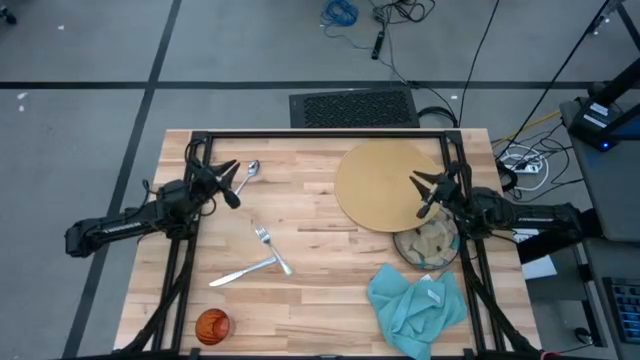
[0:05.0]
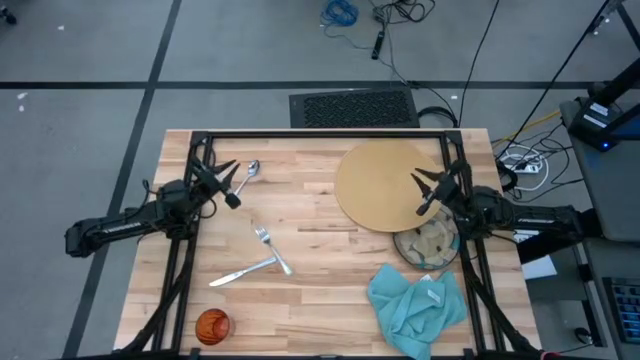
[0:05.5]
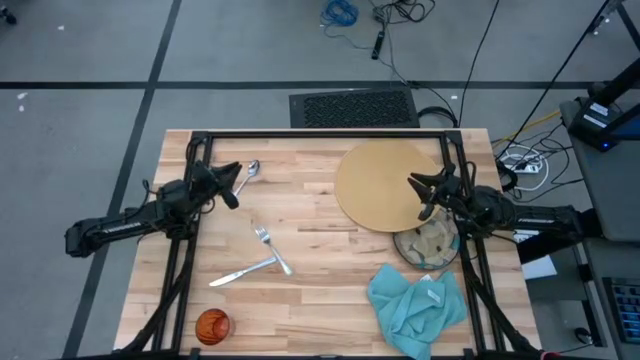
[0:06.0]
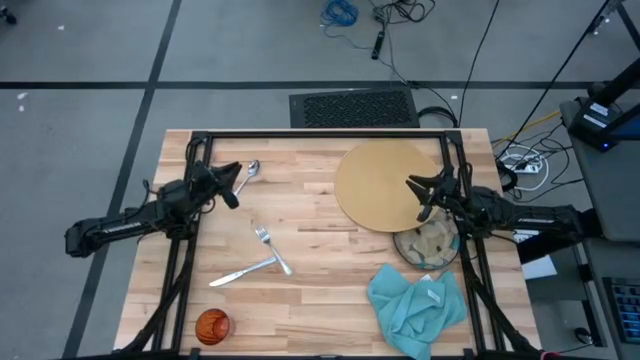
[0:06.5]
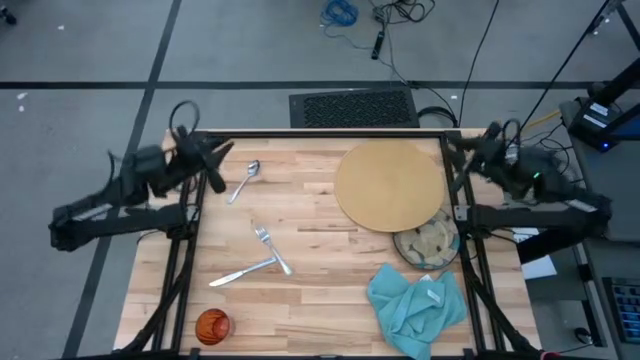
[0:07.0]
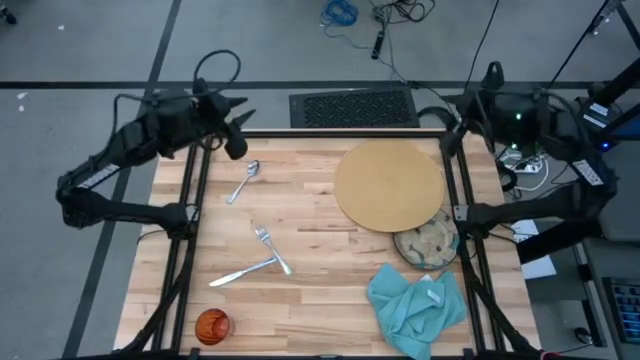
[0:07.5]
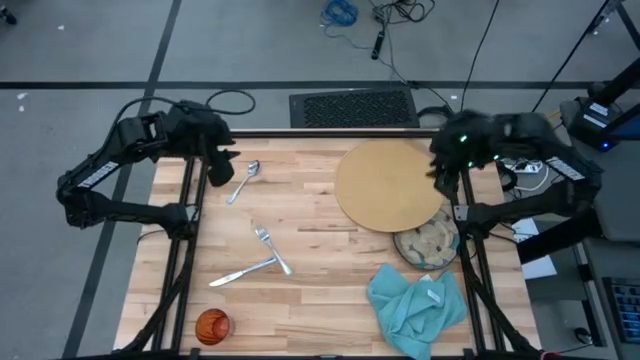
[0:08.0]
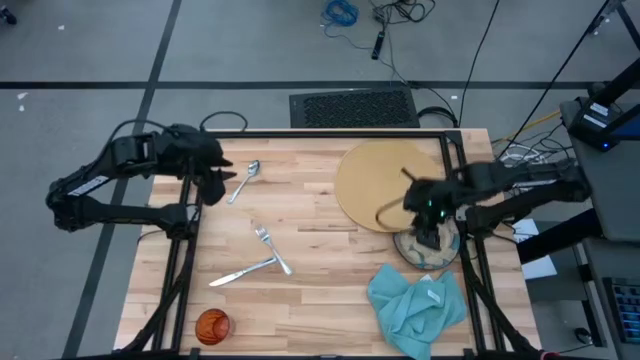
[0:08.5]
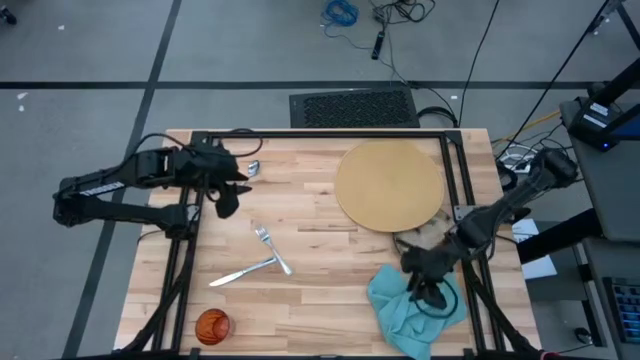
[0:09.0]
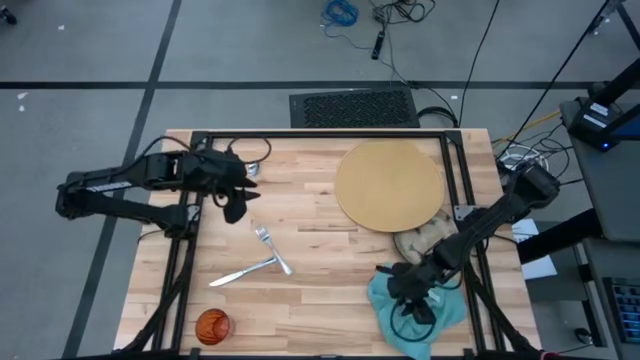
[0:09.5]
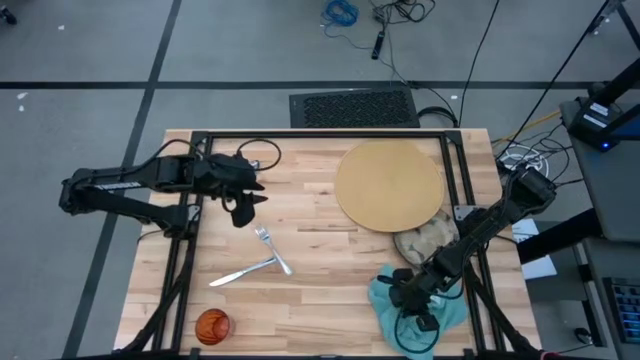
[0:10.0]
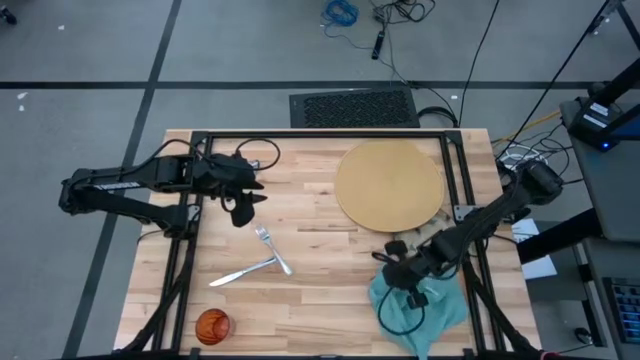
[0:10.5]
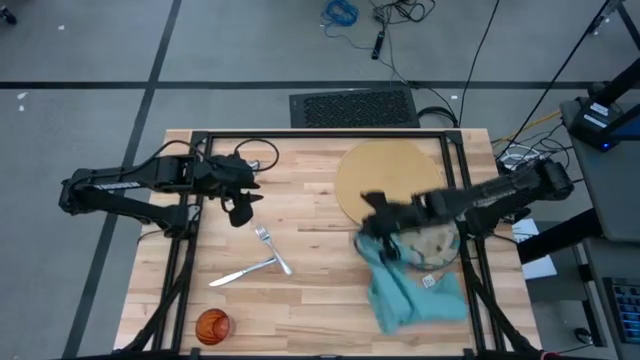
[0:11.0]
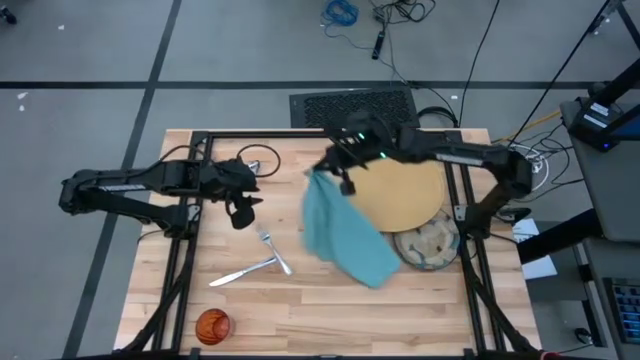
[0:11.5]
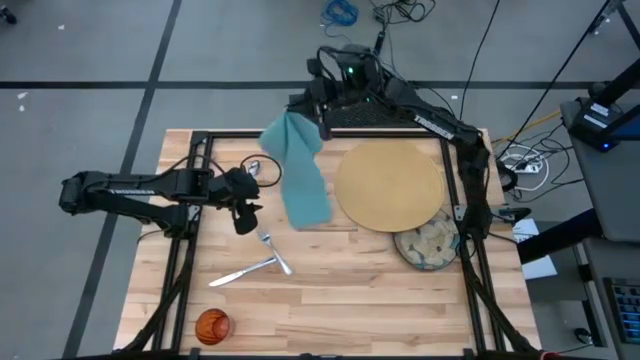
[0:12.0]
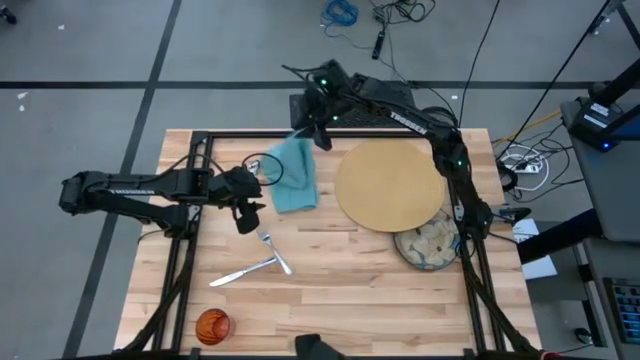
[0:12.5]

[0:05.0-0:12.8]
Task: Set table place
Move the blue napkin on the top of the table

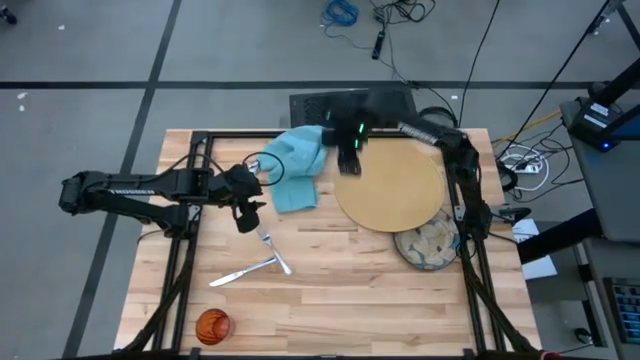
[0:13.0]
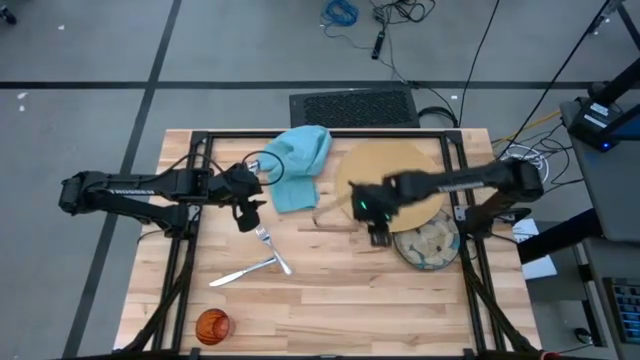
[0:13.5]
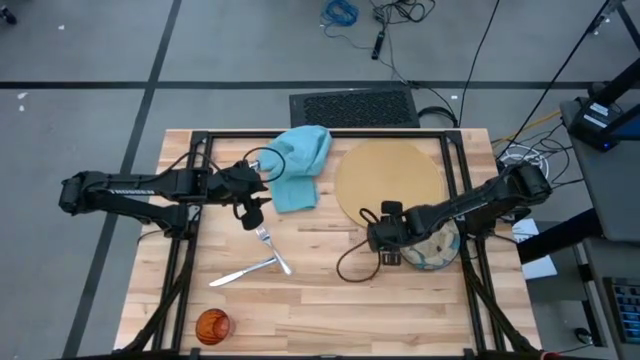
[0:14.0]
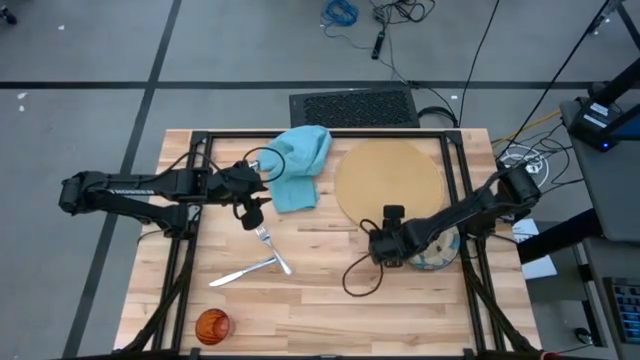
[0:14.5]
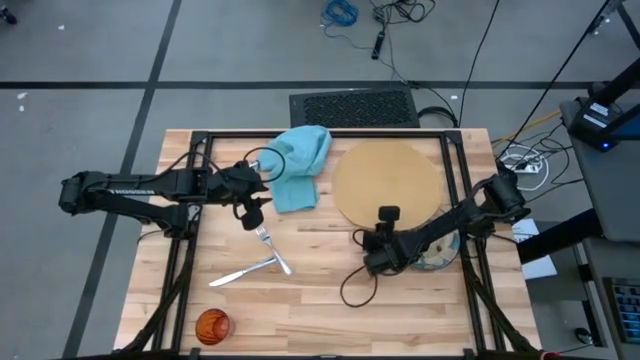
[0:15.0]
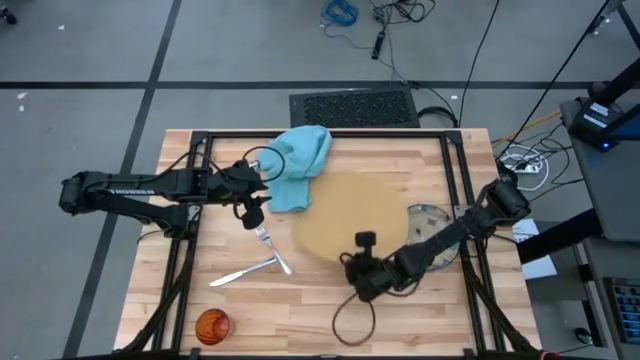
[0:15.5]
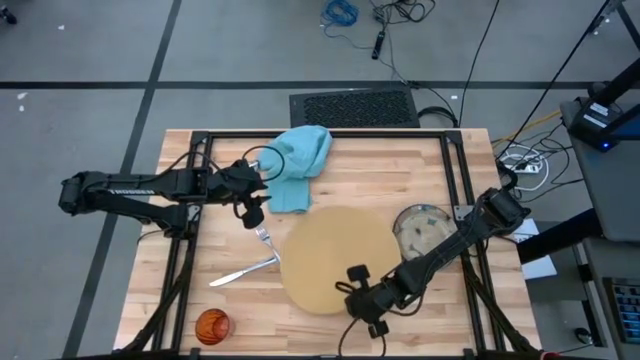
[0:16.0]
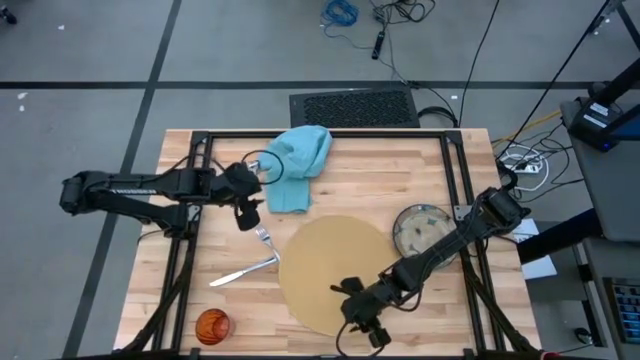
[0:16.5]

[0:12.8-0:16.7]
Move the brown placemat to the center of the table

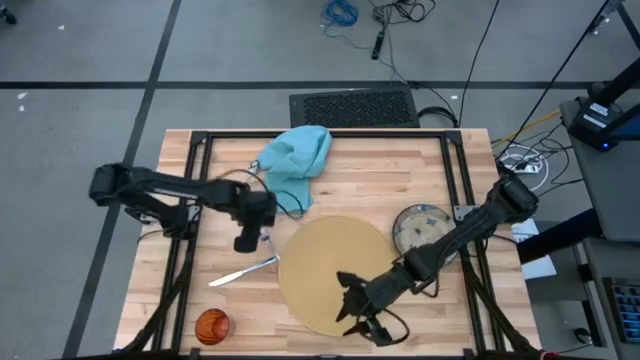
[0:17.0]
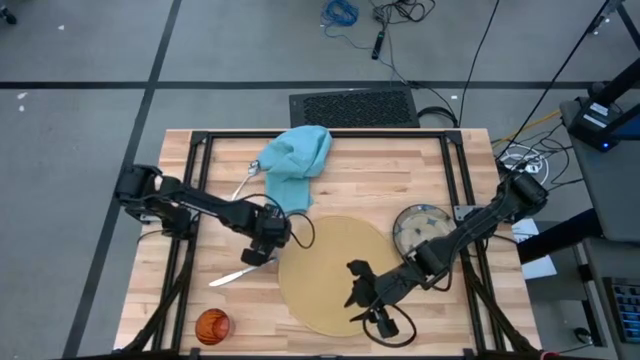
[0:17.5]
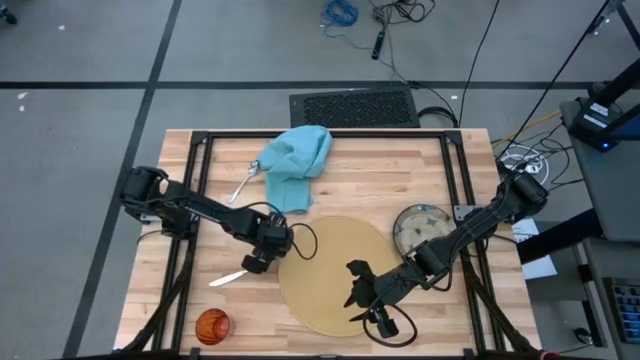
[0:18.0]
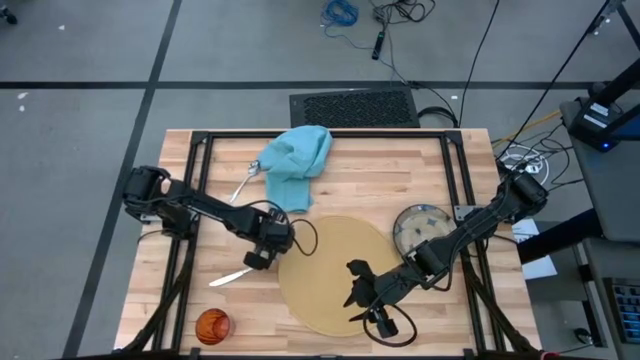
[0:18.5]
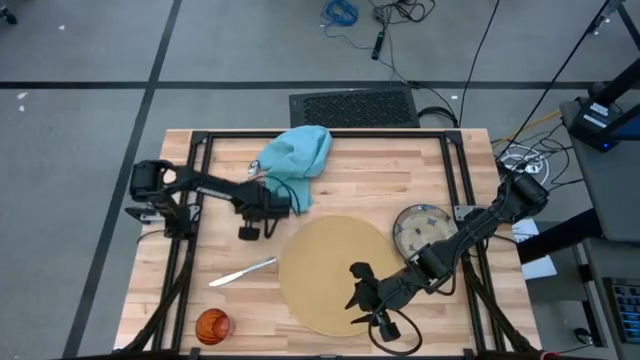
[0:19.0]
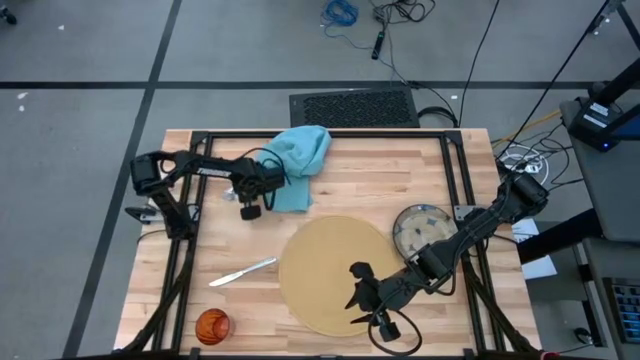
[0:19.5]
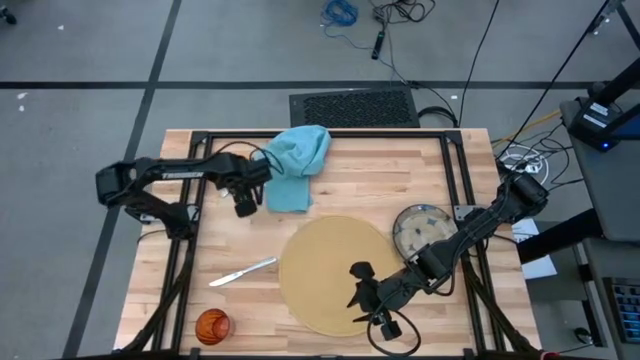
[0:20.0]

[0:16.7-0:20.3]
Move the silver fork to the top left of the table

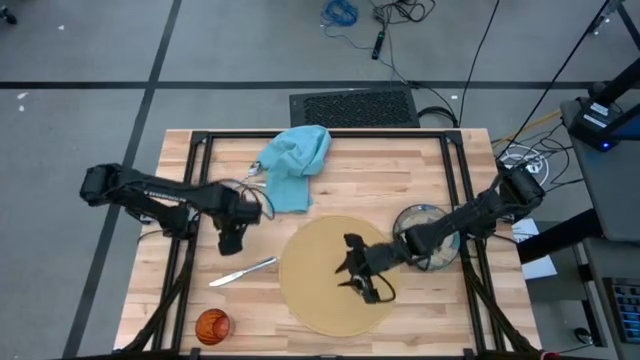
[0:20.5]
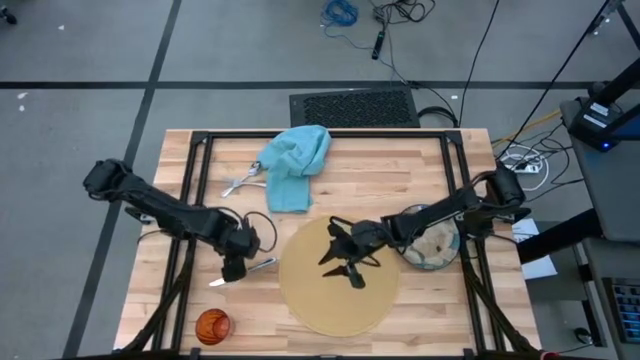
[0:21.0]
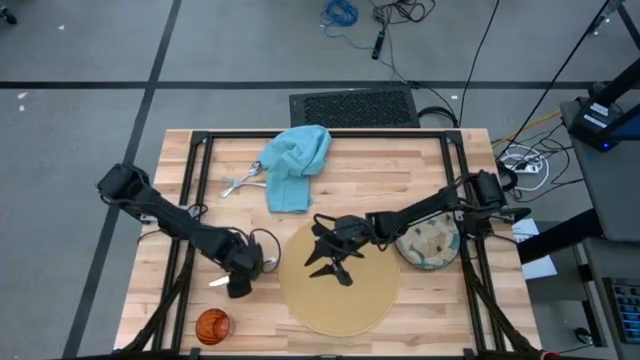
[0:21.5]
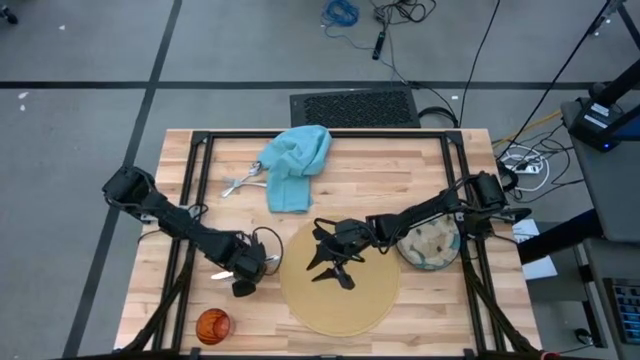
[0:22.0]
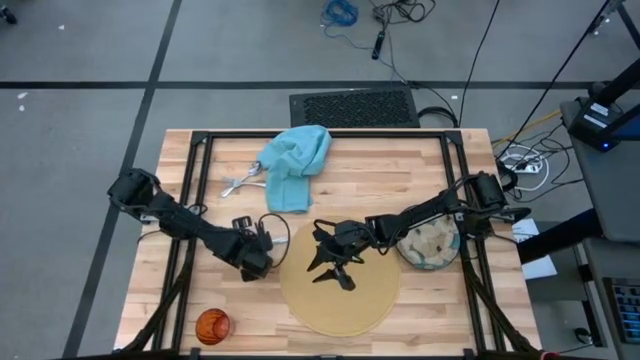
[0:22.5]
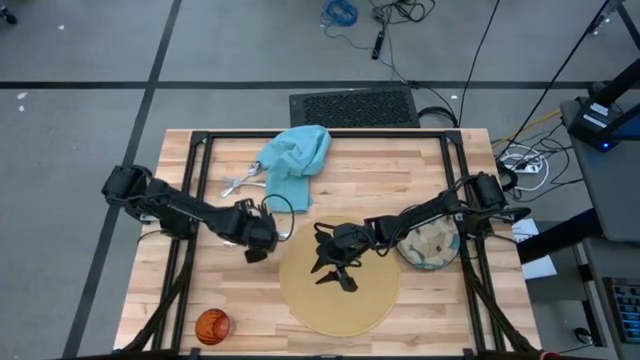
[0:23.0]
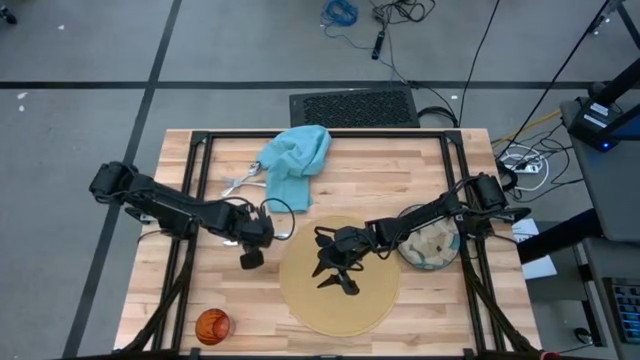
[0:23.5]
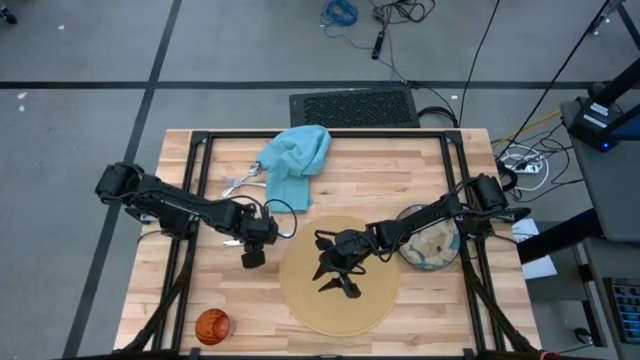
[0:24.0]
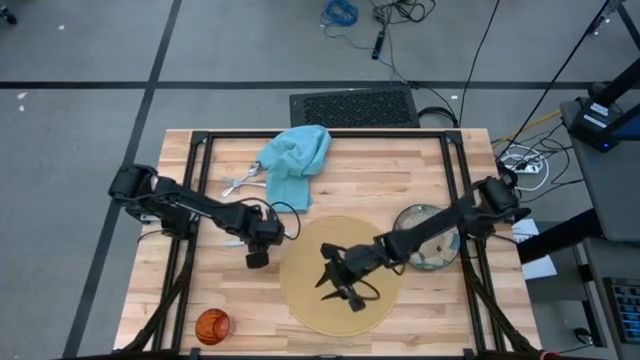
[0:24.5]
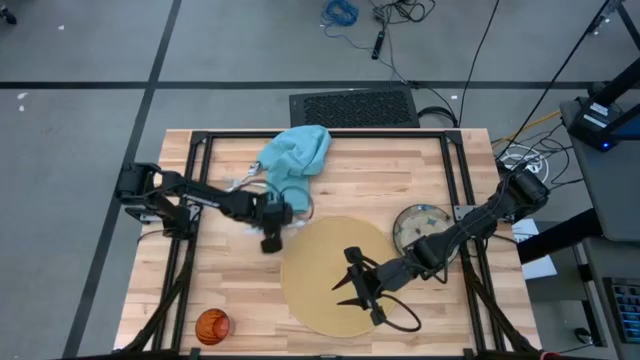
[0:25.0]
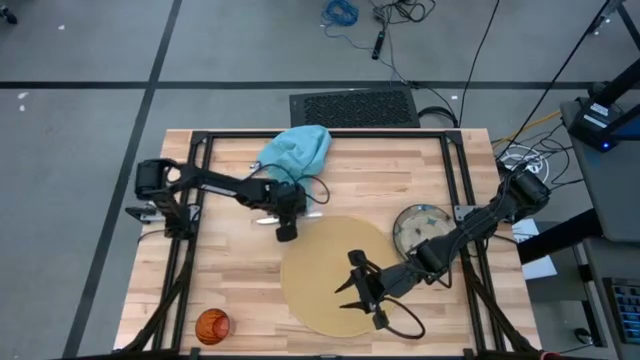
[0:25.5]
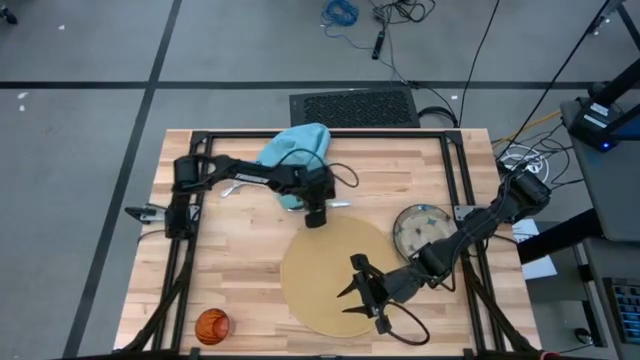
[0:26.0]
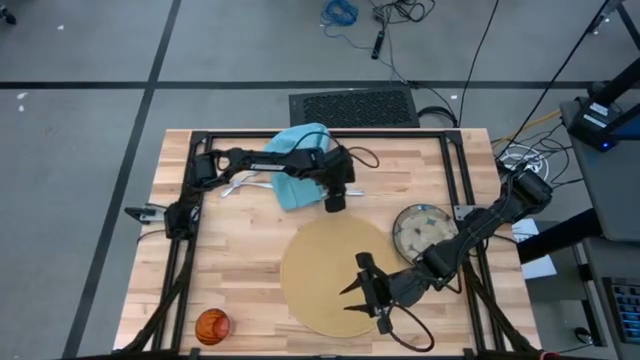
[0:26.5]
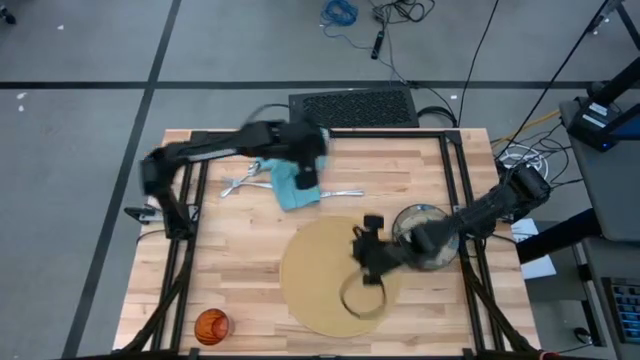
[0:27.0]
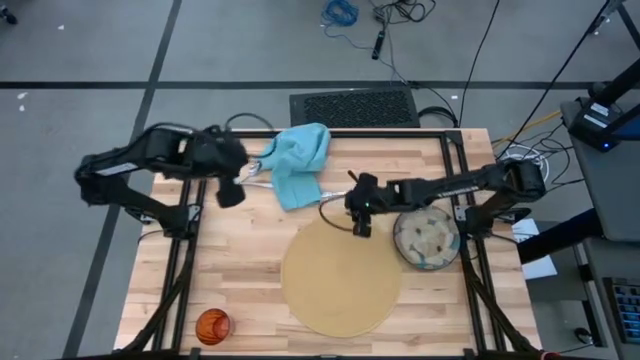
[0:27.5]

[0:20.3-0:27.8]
Move the silver knife to the top right of the table
